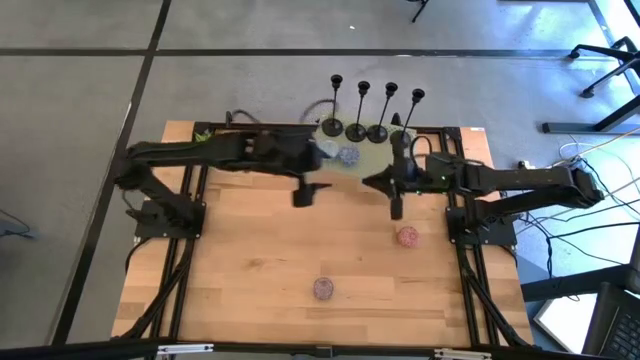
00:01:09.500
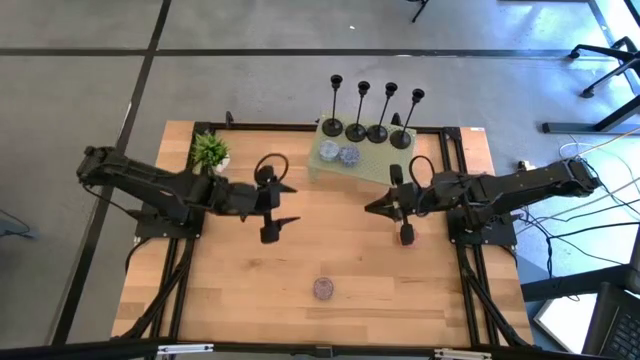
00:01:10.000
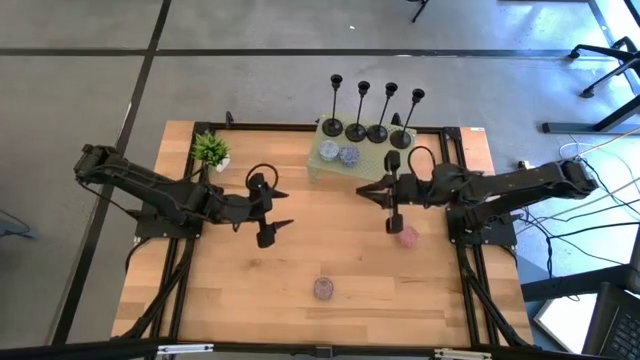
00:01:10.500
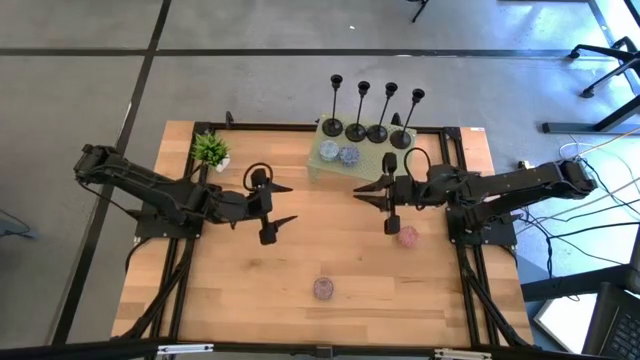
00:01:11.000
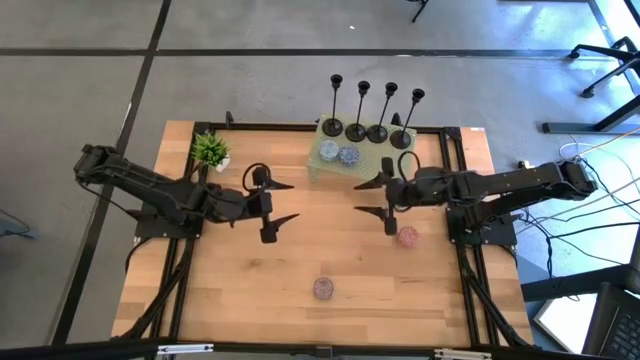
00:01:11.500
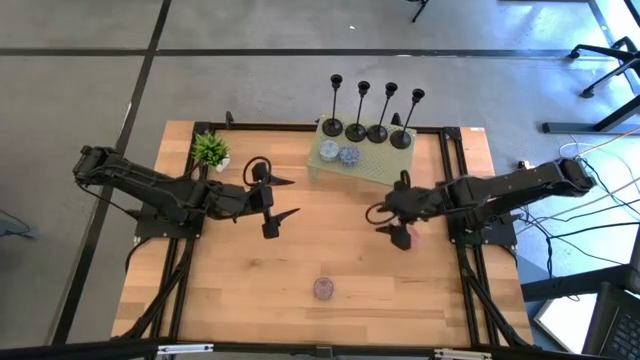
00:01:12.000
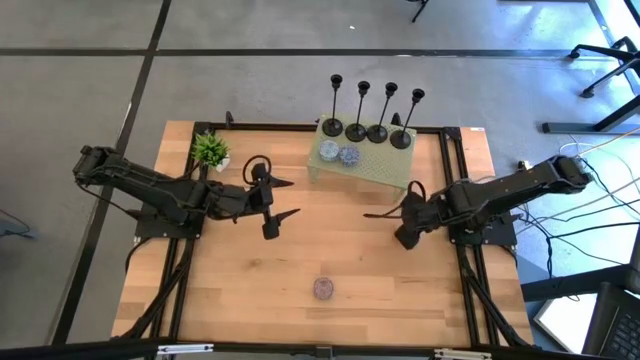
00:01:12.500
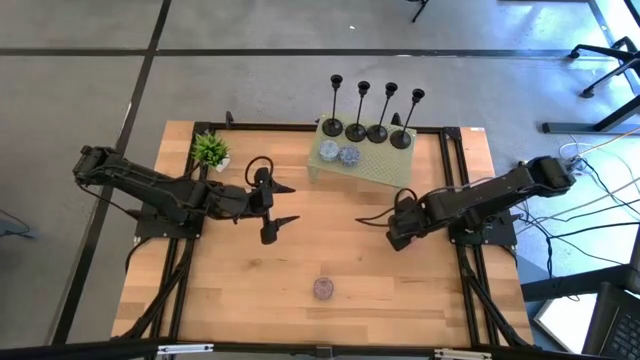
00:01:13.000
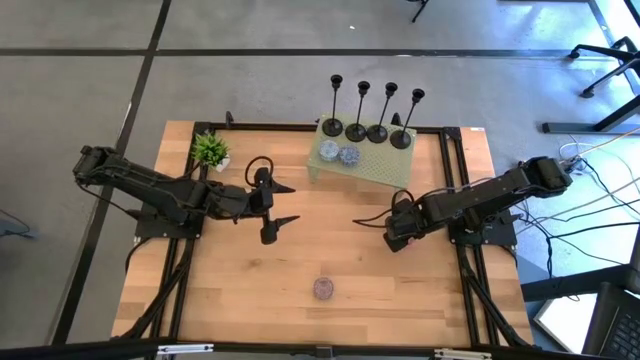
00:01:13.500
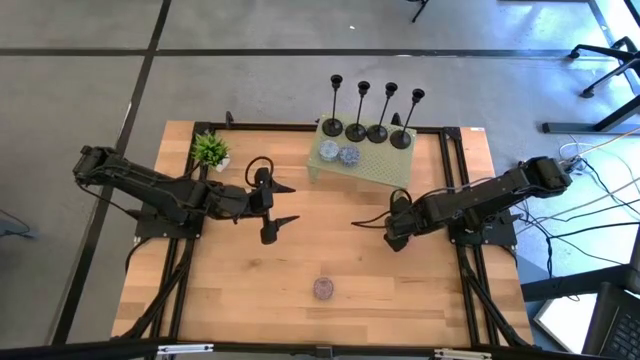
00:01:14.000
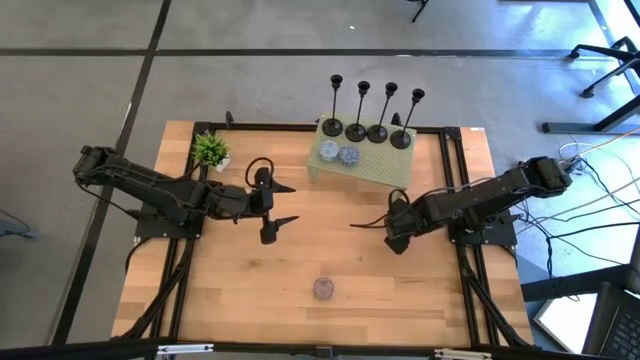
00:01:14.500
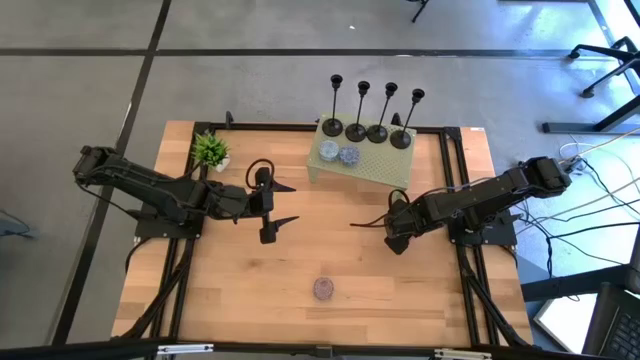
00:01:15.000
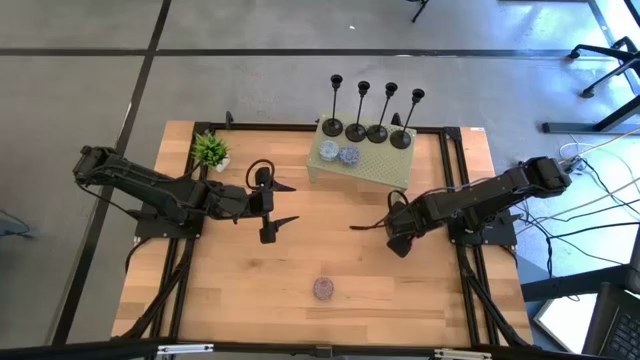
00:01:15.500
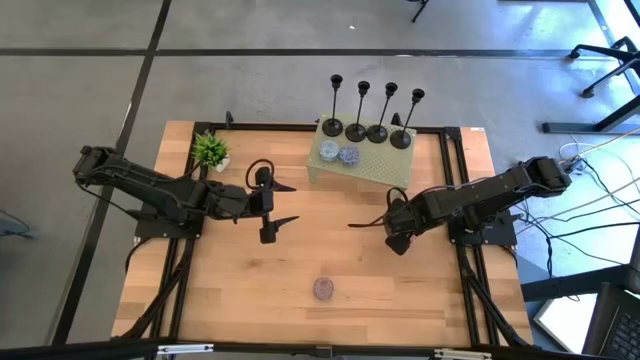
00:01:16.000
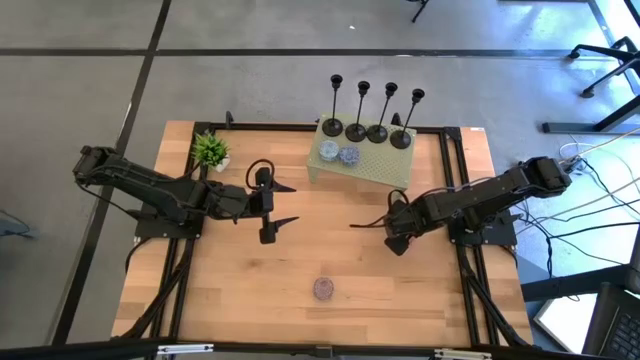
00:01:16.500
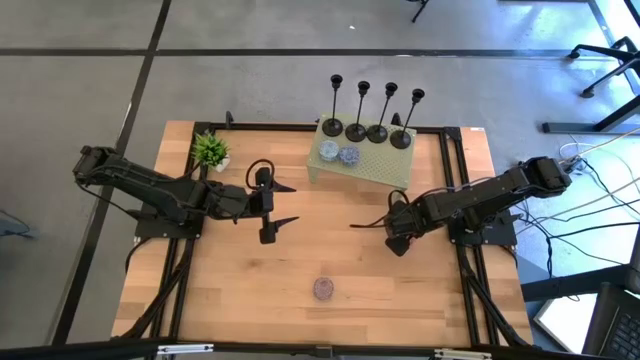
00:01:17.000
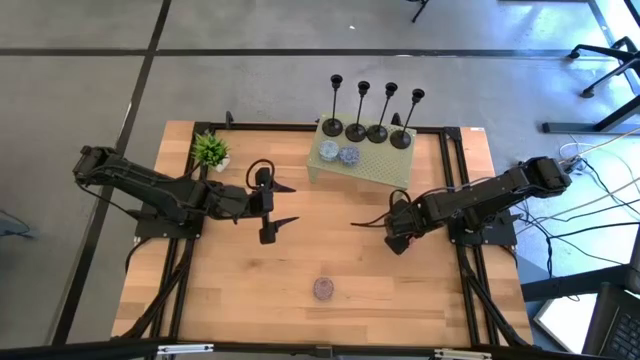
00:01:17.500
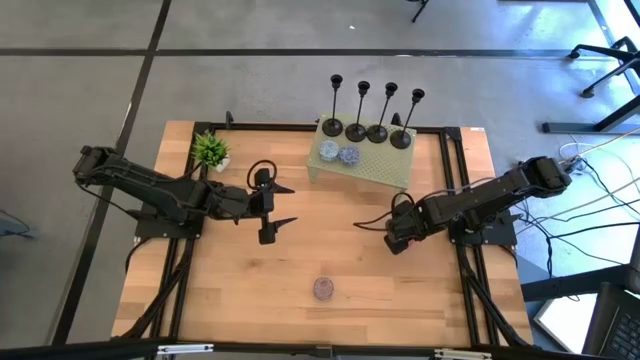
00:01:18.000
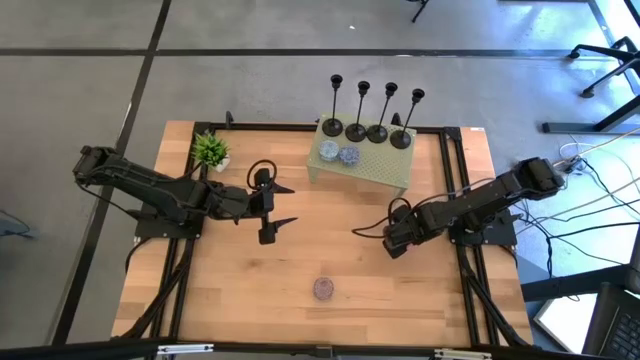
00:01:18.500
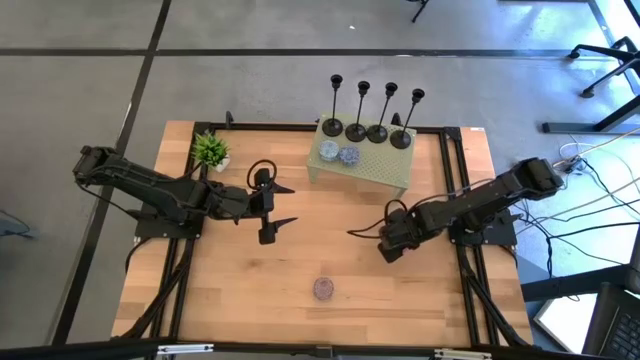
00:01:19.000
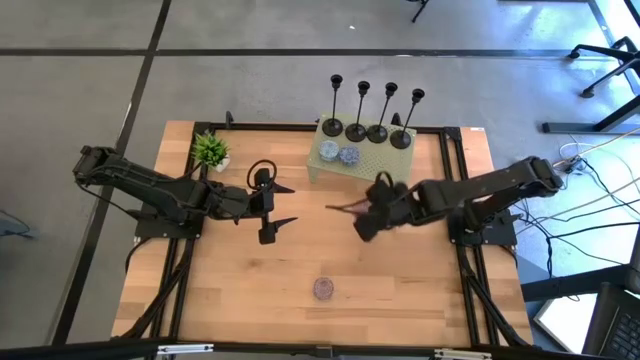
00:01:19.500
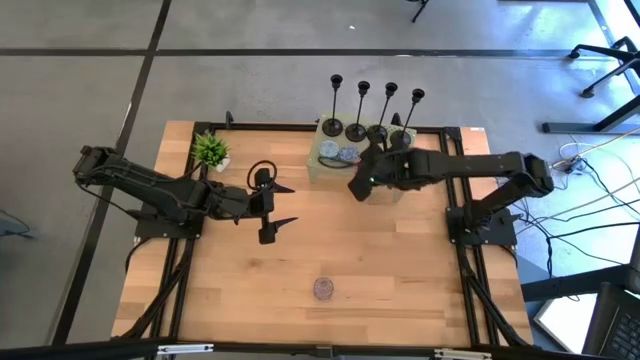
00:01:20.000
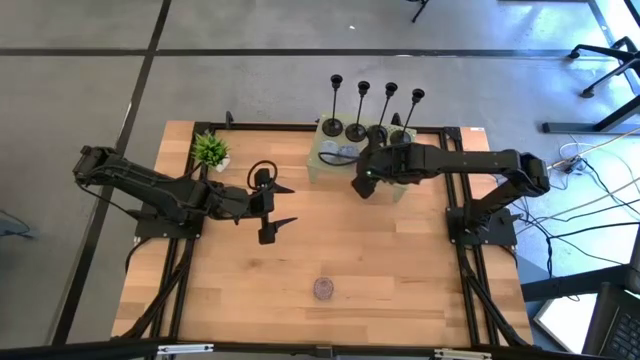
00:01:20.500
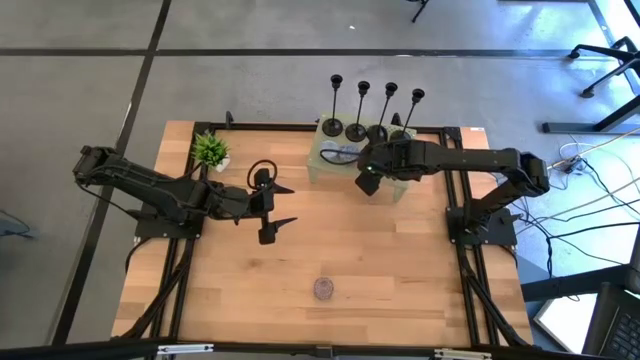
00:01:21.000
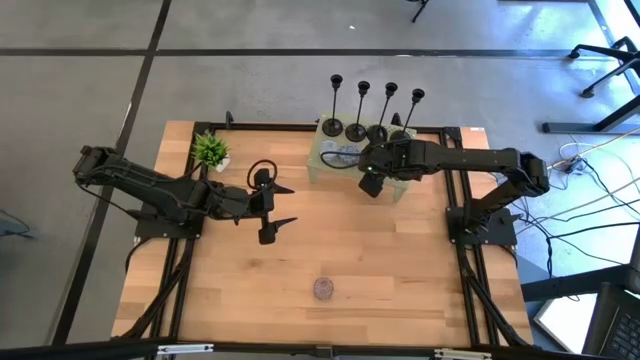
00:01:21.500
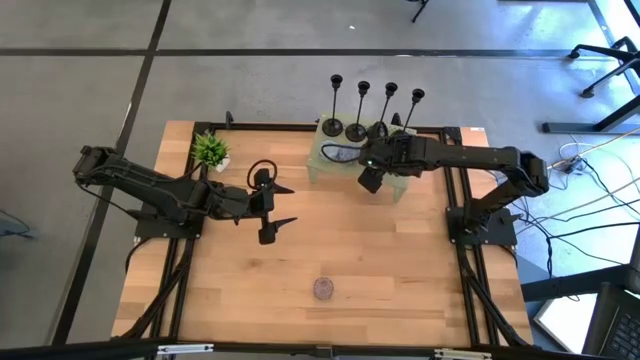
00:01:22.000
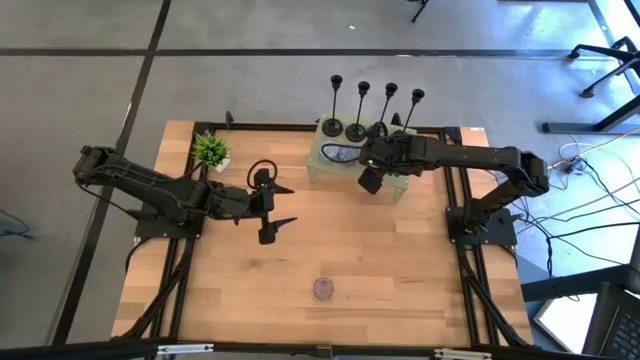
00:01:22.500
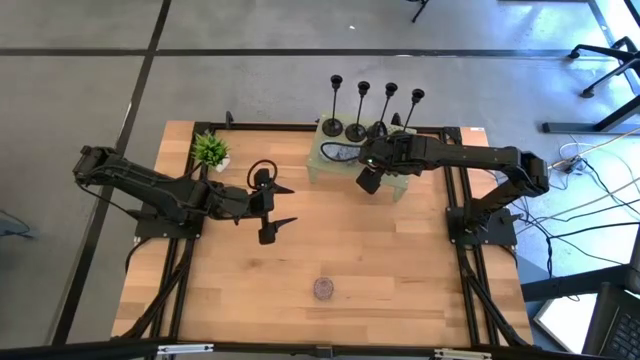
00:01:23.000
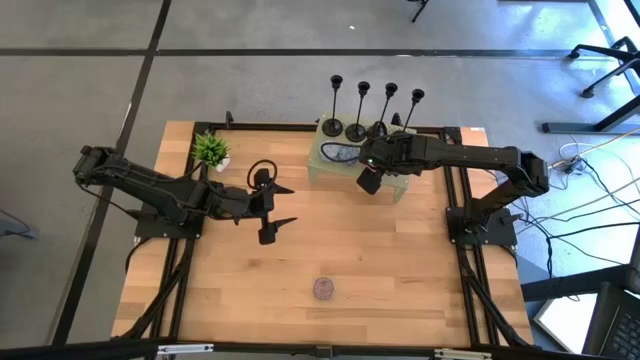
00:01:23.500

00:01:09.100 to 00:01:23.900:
Task: Pick & Place candle stick holders
Put the patterned pink scented candle on the shelf aligned with the black candle holder

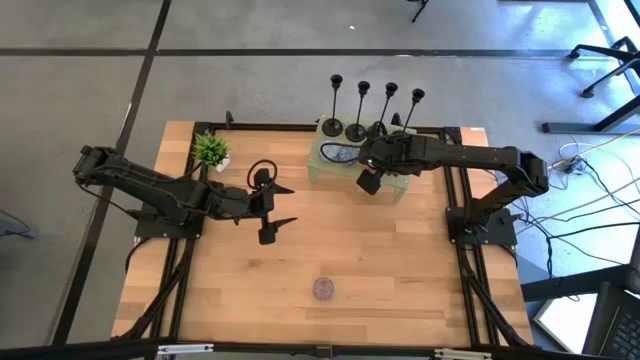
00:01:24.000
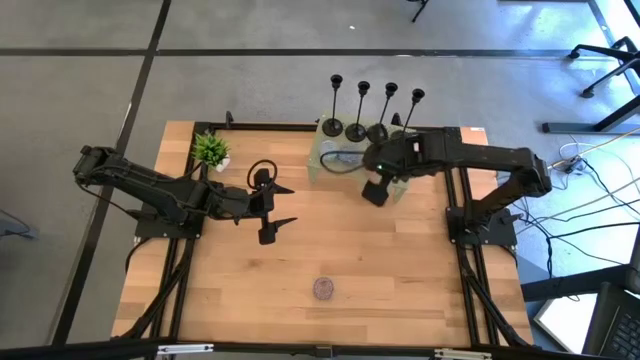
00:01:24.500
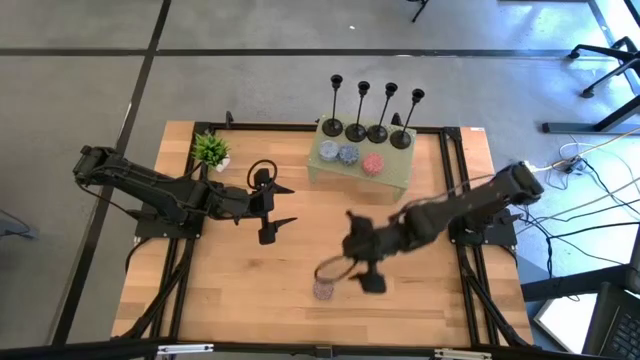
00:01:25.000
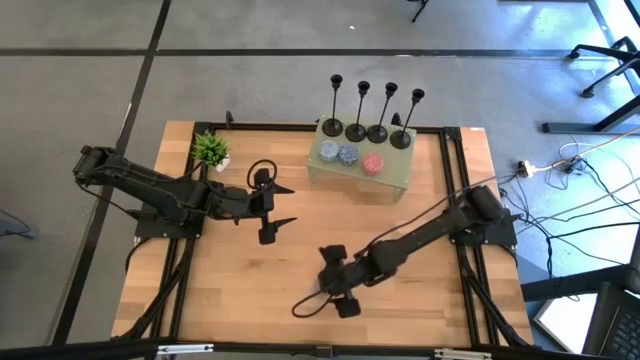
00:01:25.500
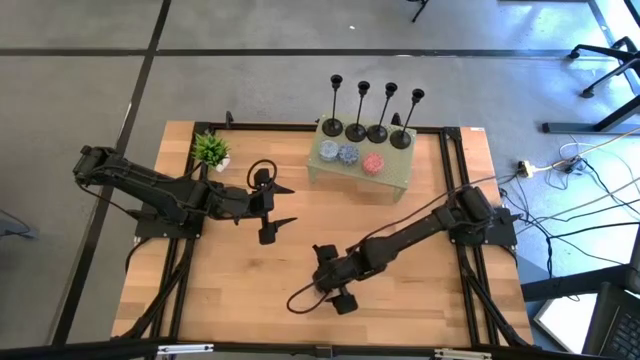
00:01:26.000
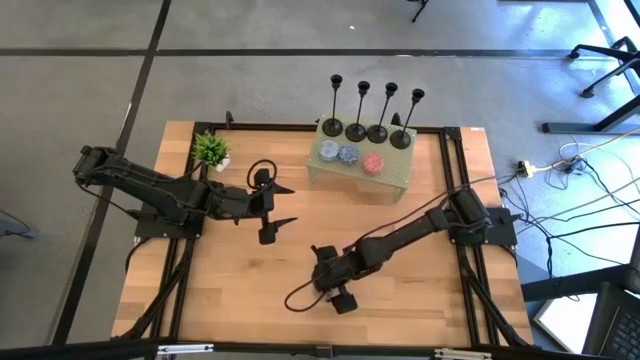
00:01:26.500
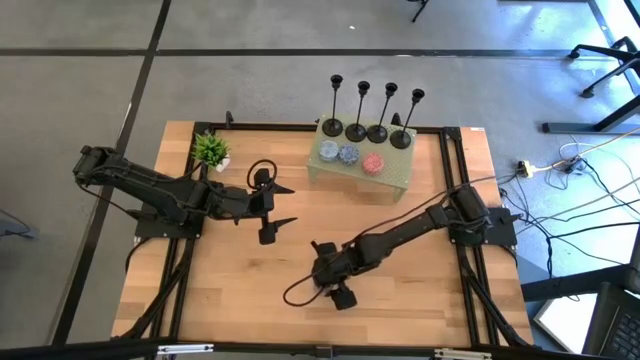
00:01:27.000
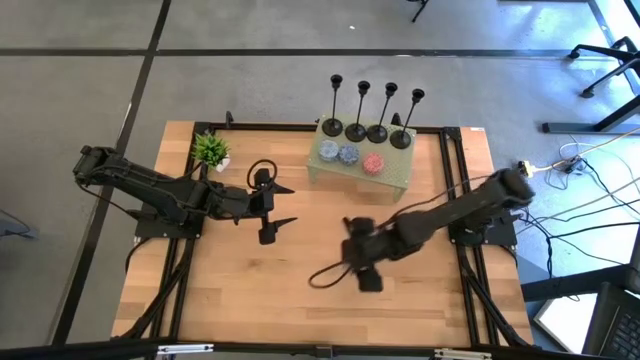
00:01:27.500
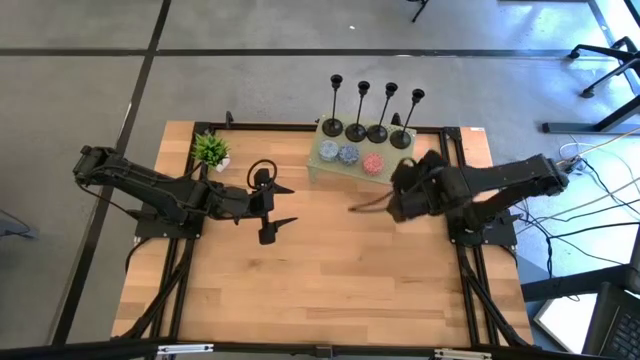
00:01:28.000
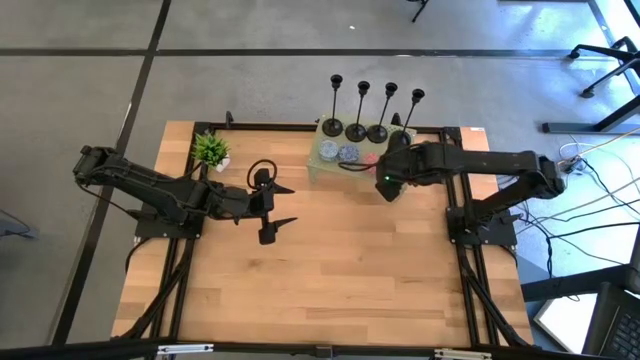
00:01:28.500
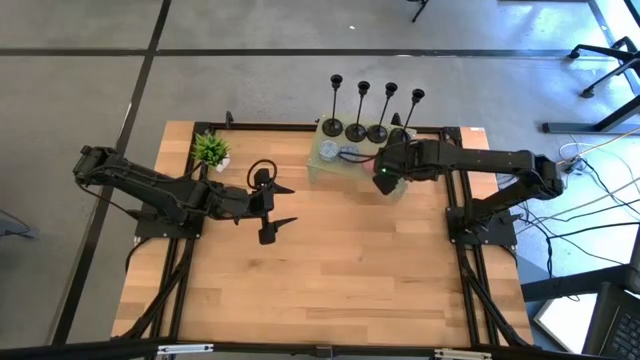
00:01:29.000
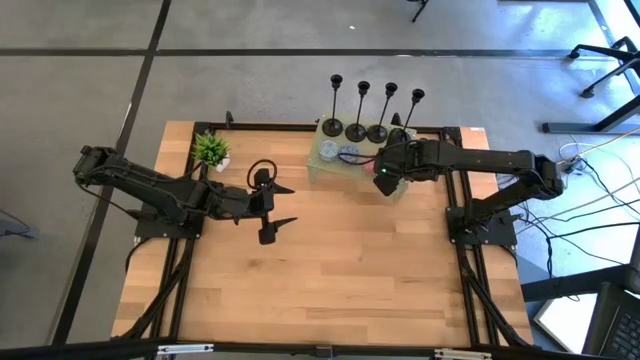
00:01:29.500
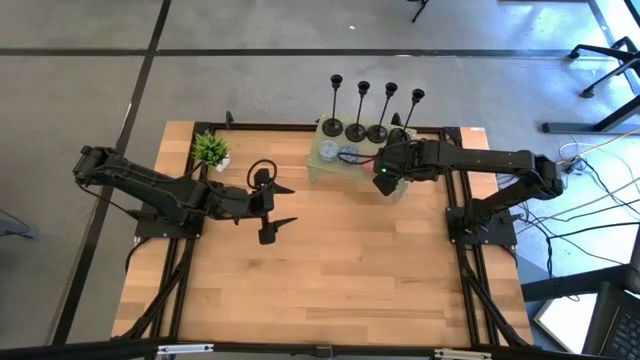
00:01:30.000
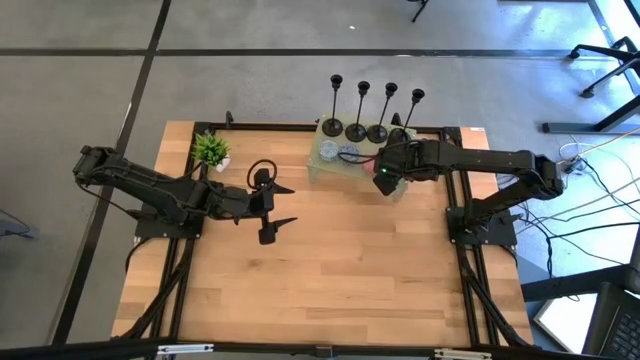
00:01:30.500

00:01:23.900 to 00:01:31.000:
Put the patterned red scented candle on the shelf aligned with the black candle holder
